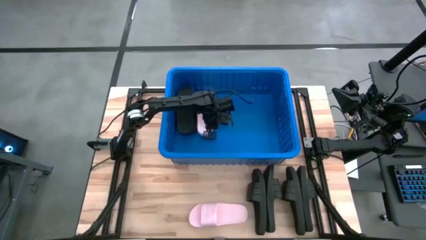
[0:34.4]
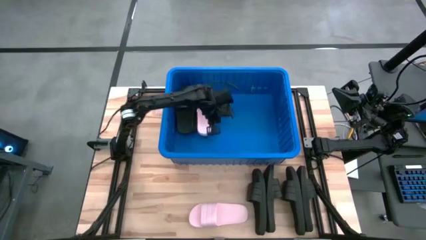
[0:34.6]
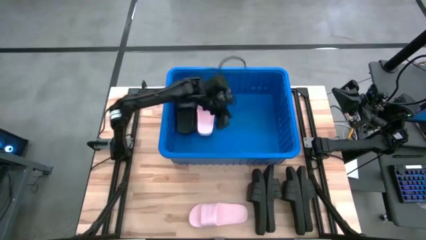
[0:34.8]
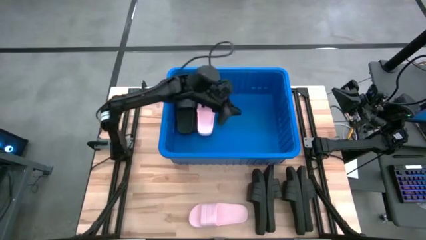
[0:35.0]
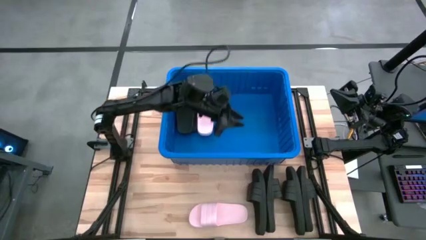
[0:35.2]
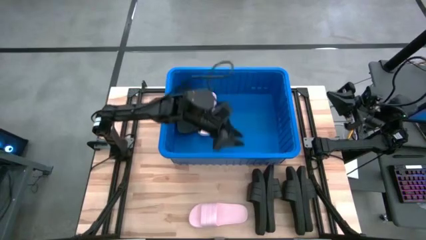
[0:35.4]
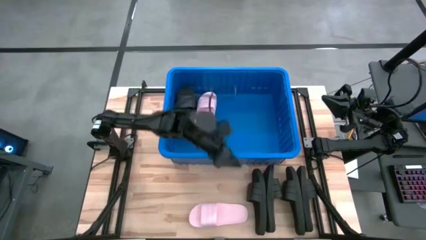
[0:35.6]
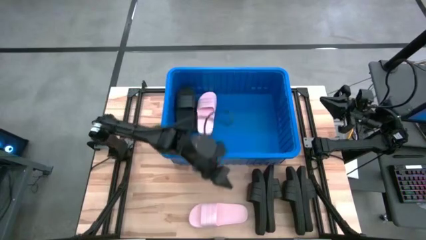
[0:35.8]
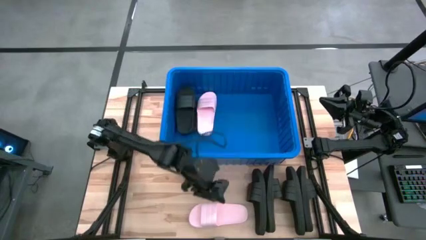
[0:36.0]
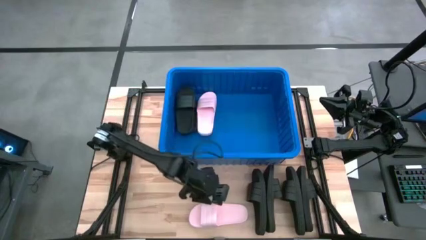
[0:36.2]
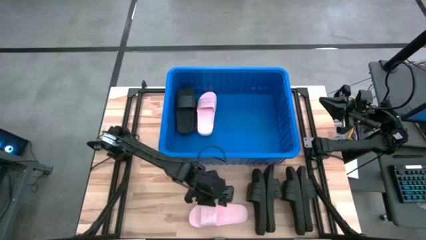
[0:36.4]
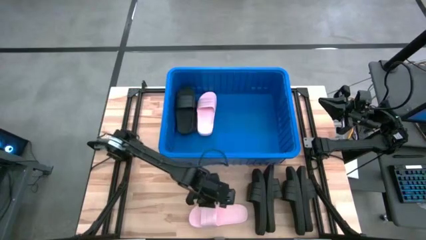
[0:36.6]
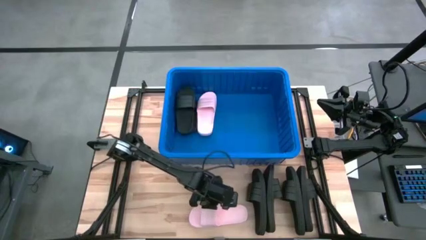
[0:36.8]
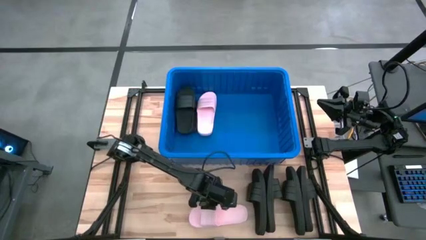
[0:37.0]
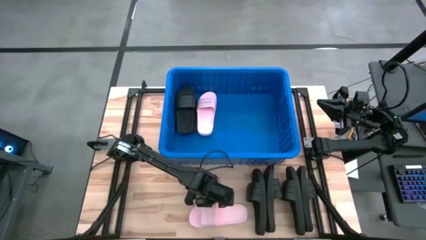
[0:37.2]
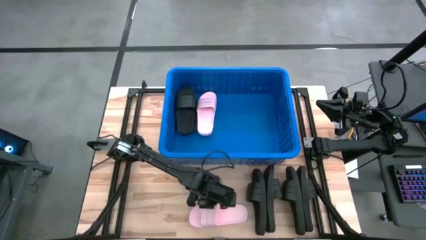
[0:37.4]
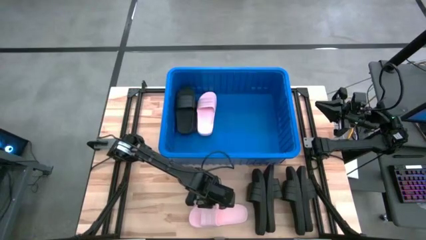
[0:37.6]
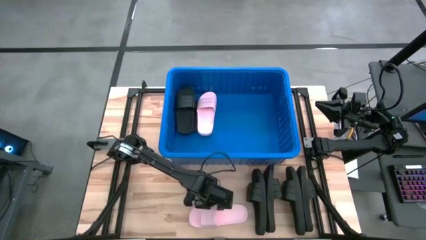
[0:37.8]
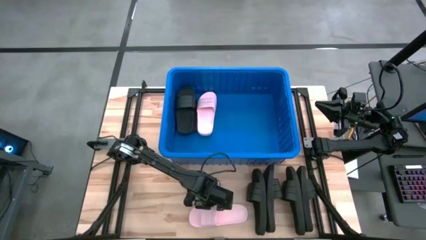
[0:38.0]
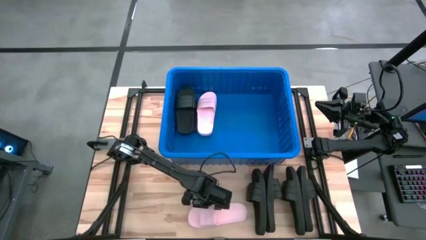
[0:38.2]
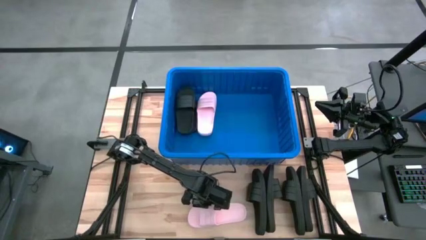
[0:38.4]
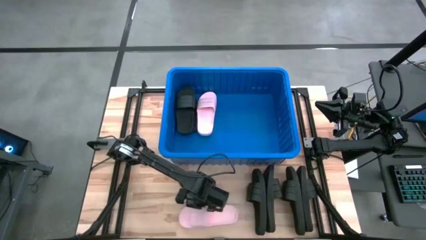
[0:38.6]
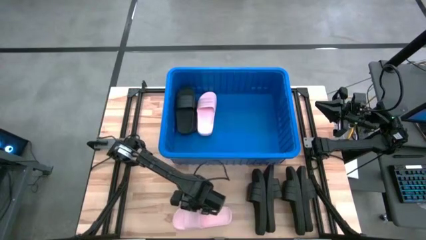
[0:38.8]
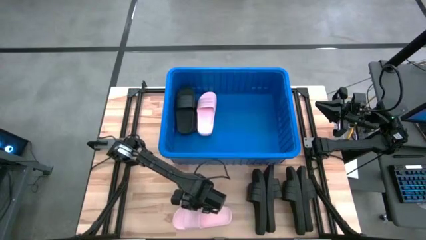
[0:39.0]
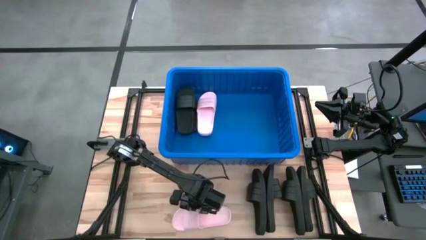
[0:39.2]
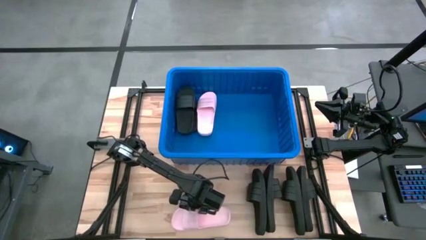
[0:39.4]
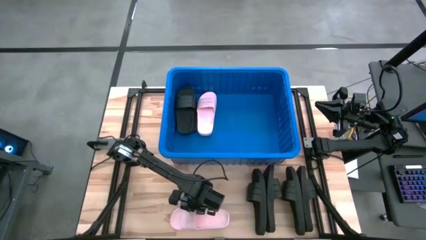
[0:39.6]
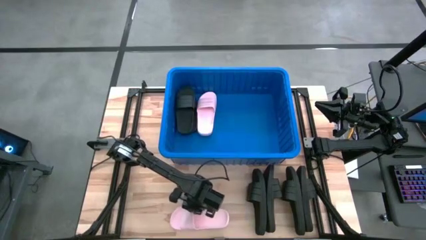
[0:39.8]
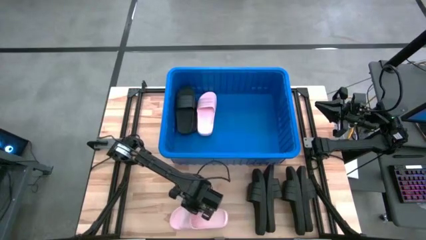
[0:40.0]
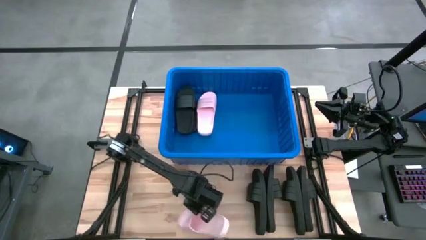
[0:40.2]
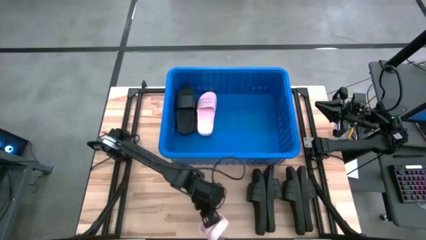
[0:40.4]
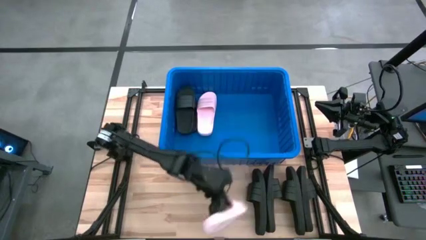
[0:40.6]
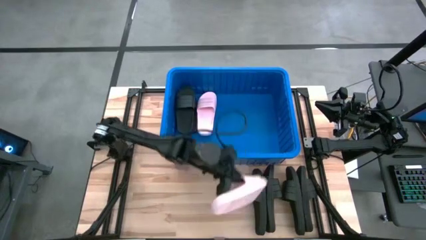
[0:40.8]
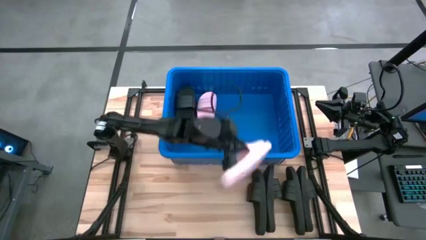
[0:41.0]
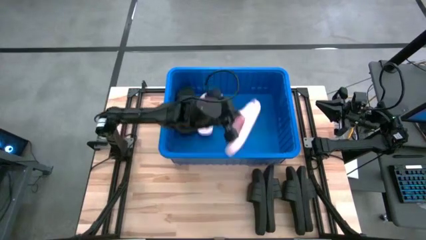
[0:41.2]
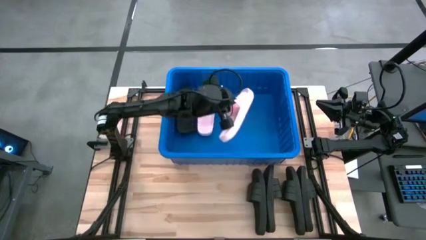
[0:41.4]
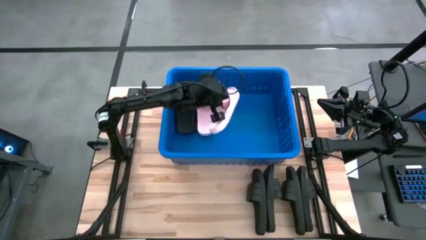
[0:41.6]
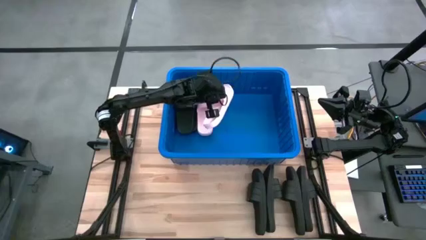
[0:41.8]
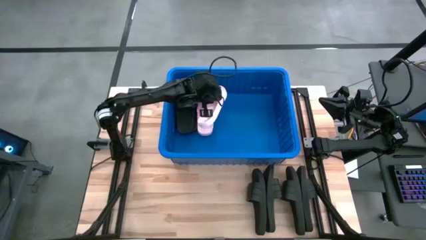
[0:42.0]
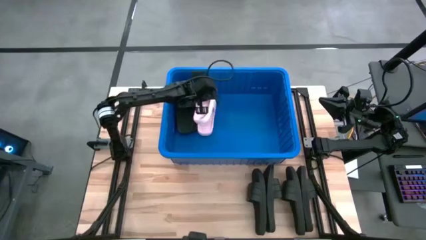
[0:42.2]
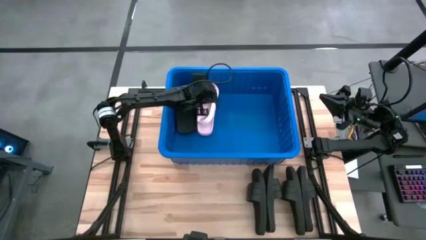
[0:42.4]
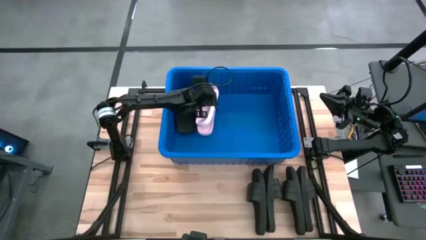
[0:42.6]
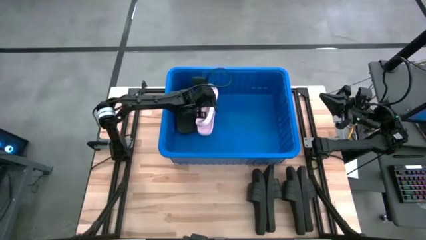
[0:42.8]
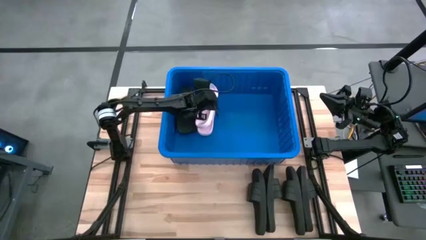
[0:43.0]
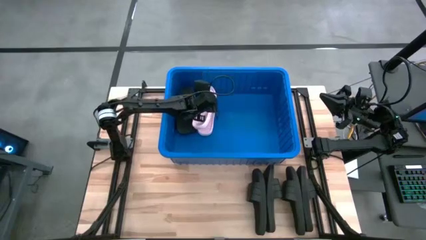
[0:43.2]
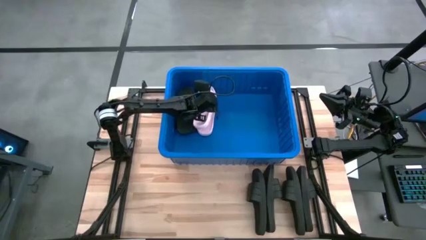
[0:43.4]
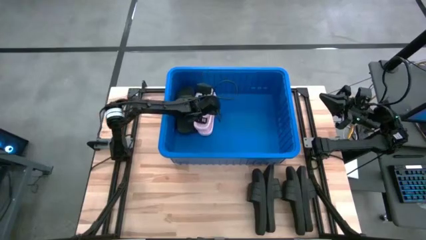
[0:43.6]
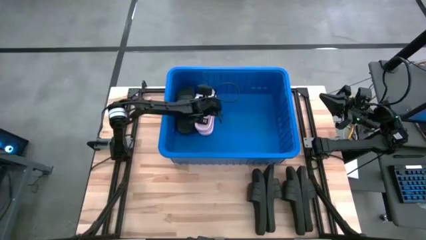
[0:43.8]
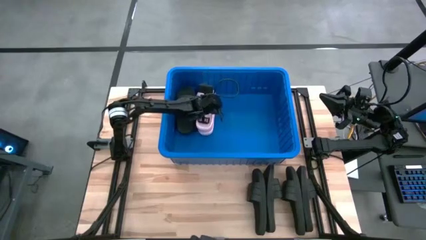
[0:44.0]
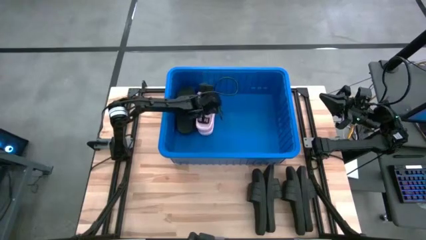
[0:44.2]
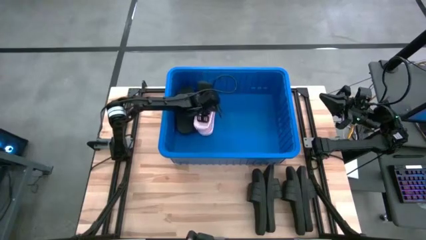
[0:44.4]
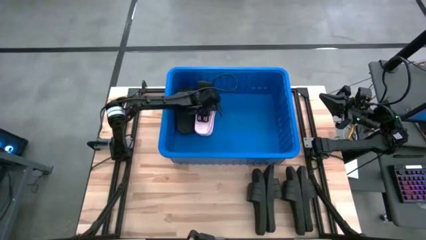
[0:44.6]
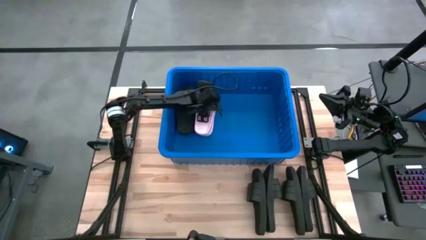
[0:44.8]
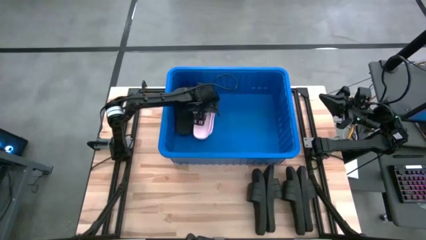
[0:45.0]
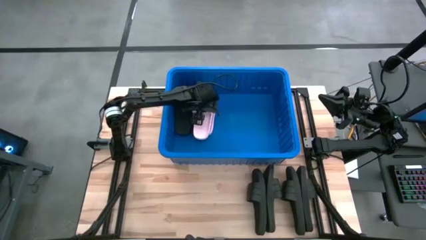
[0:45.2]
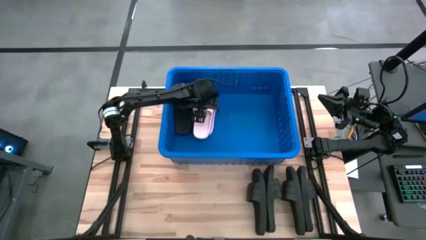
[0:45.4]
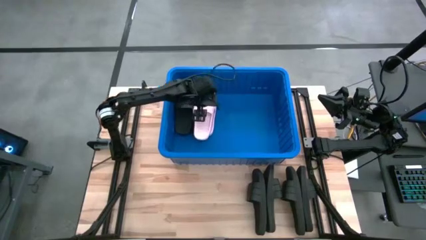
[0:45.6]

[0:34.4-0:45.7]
Task: Pick and place slides into bin
Put the pink slide into the blue container
